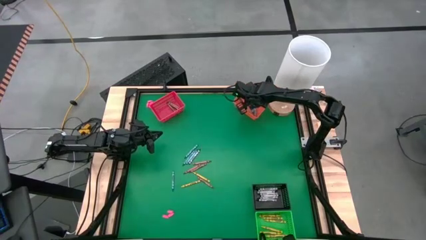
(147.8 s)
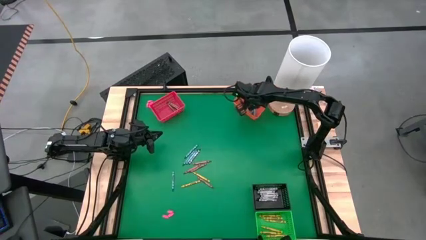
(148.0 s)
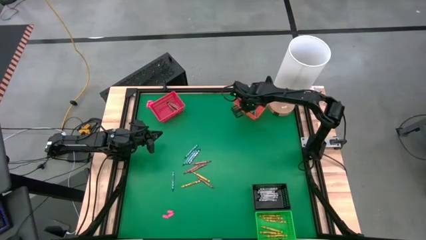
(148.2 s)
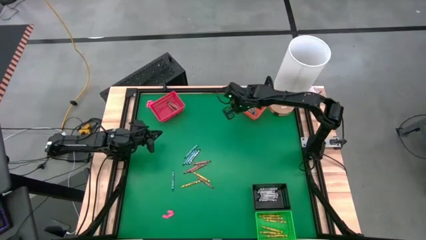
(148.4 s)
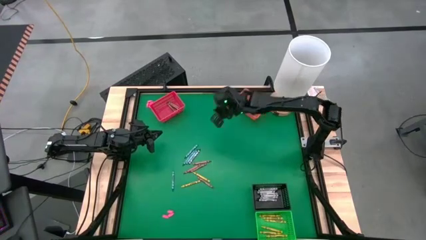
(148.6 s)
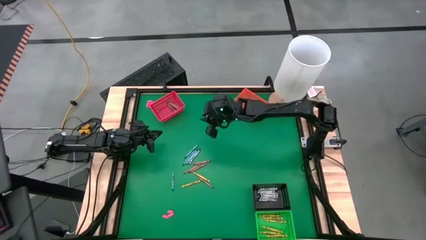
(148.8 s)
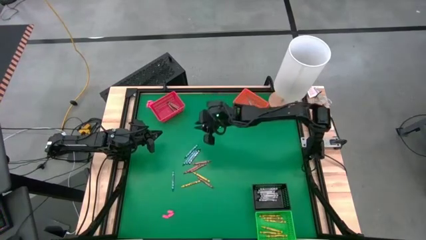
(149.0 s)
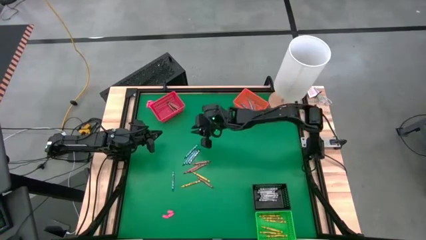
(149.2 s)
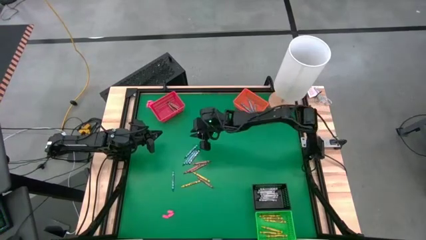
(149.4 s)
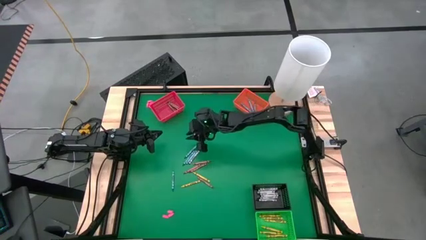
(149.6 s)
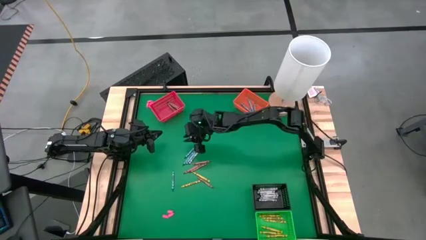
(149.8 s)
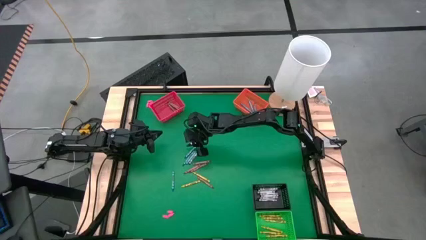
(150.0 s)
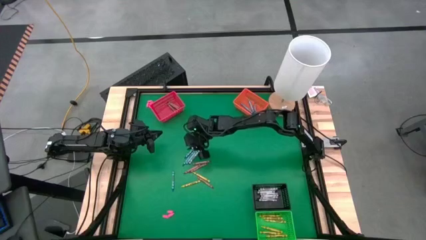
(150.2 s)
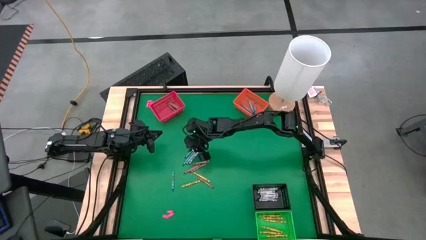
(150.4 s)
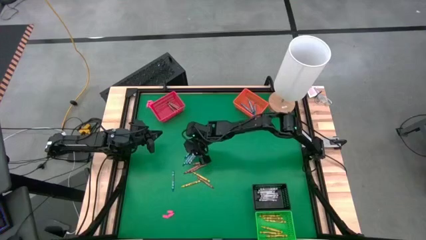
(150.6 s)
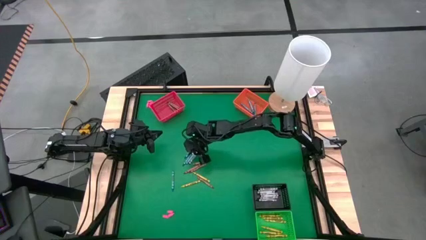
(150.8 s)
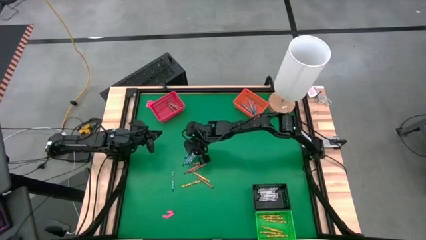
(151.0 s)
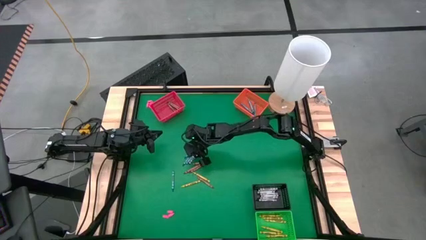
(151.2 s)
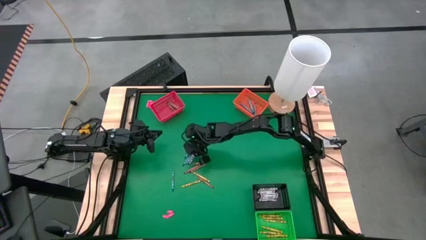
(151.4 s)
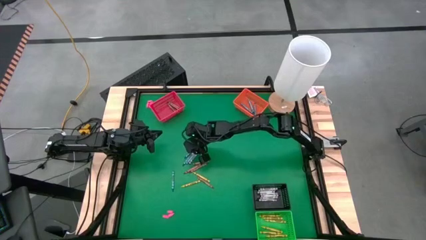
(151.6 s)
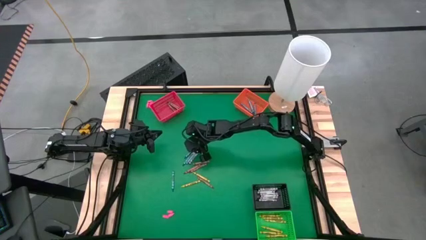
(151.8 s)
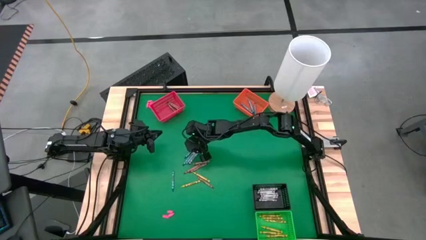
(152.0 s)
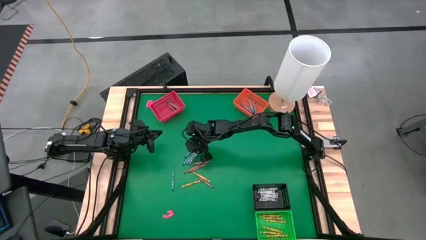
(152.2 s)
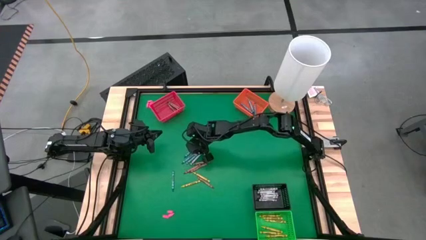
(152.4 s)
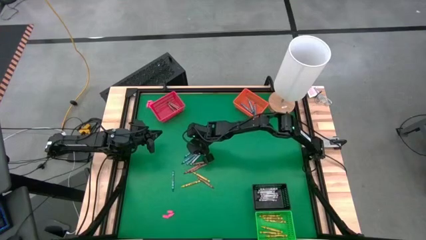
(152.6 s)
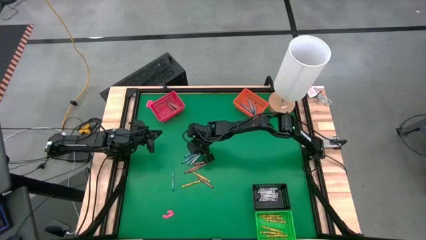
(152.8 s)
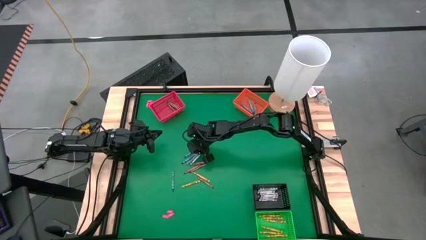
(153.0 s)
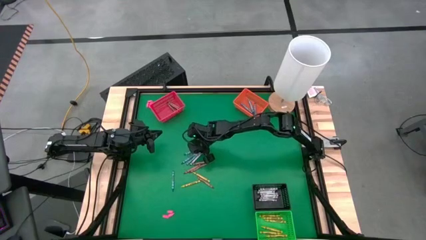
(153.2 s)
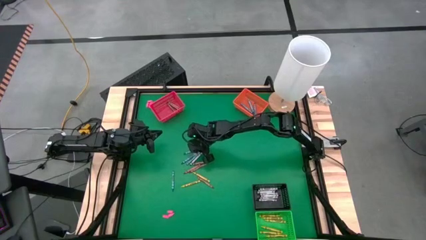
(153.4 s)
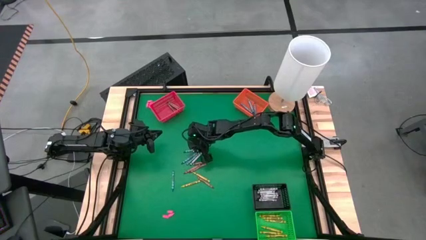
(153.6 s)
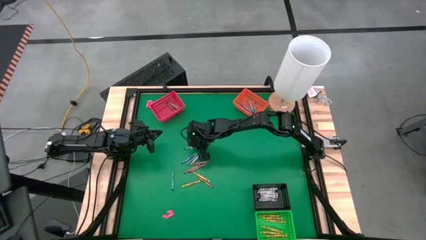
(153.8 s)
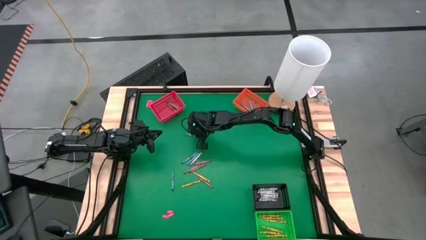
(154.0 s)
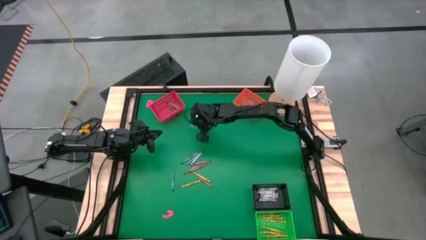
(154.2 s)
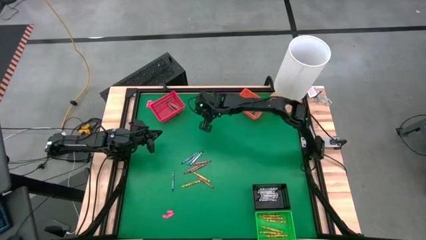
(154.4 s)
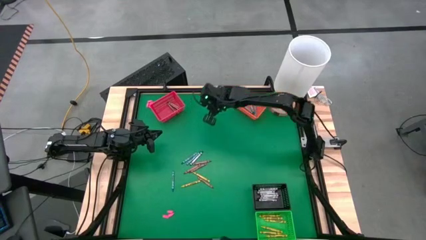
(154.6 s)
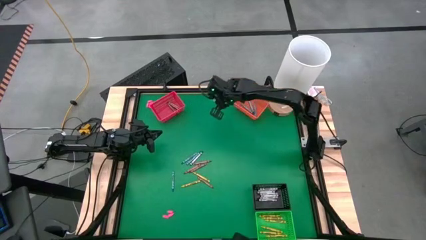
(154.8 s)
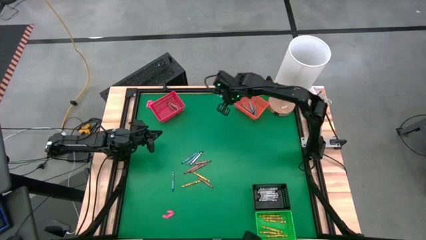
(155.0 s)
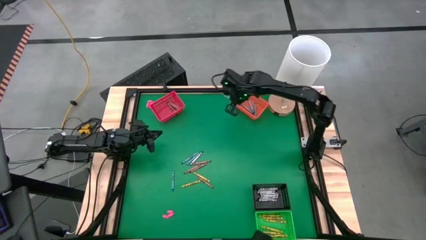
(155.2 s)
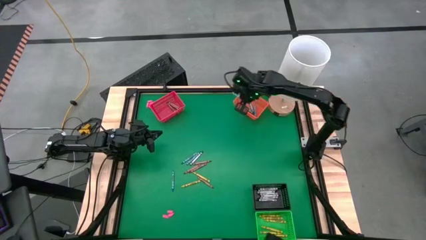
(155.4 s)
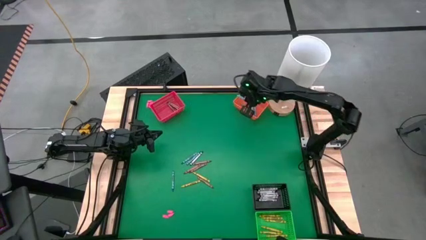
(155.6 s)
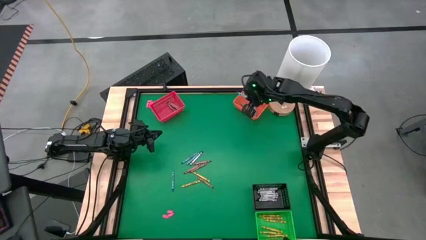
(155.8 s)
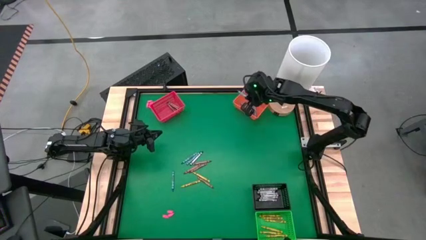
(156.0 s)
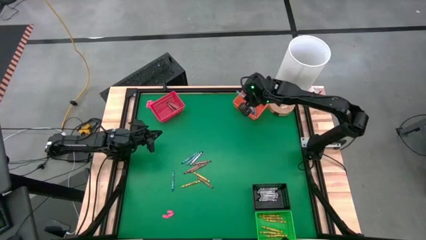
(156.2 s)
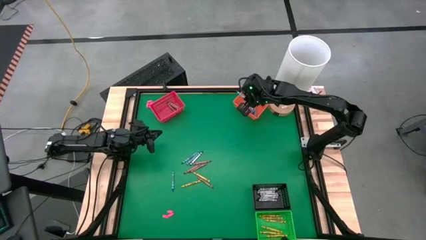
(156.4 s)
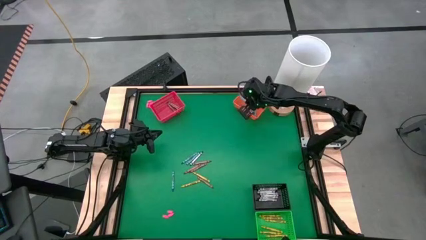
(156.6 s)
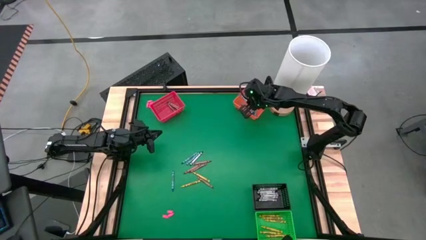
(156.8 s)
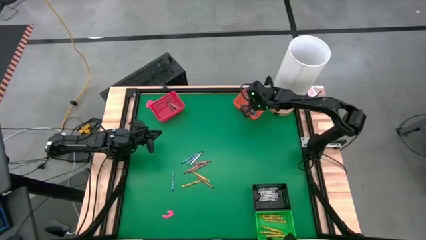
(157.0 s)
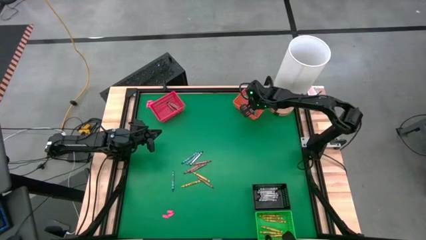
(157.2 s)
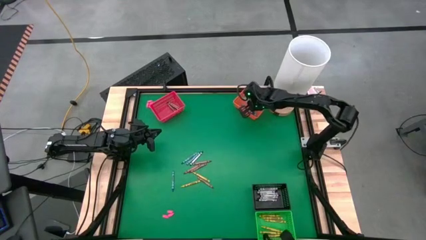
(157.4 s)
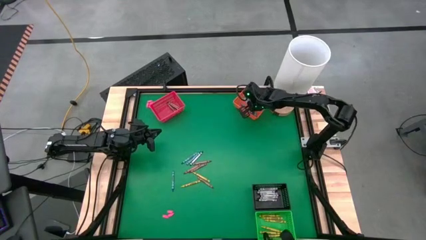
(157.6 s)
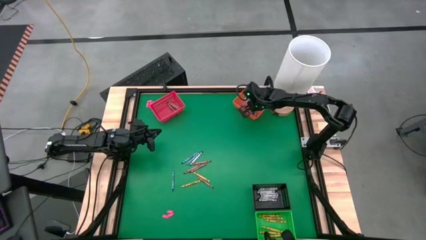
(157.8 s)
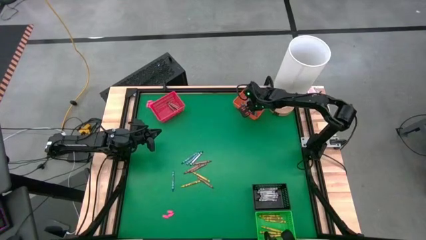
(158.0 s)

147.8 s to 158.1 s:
Task: Sort crayons
Put the blue crayon into the orange bin

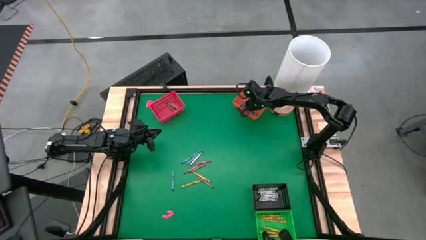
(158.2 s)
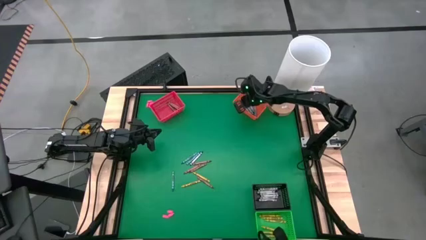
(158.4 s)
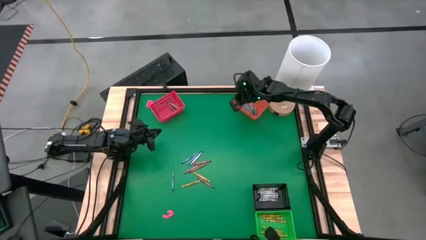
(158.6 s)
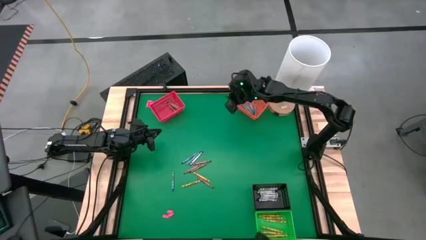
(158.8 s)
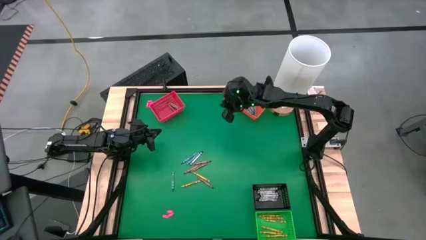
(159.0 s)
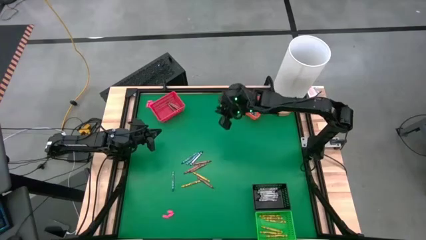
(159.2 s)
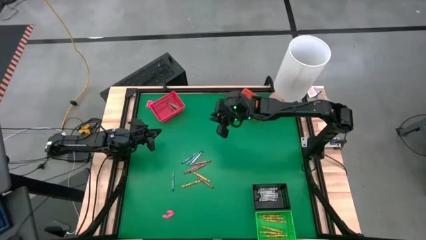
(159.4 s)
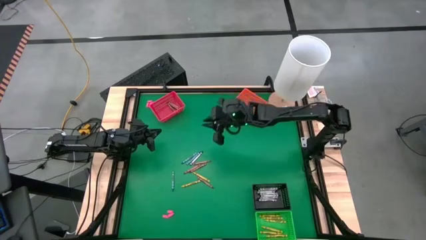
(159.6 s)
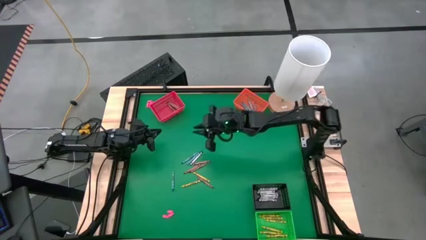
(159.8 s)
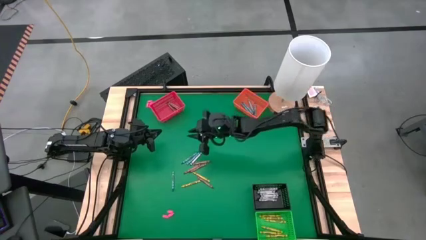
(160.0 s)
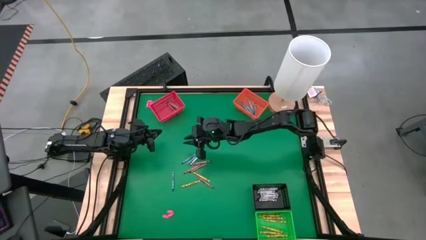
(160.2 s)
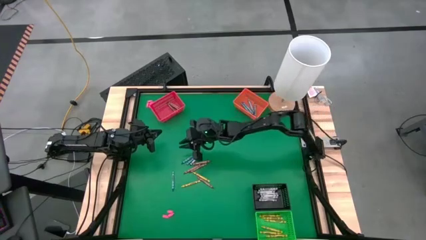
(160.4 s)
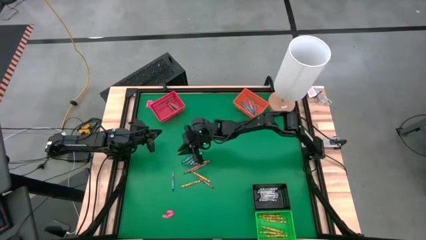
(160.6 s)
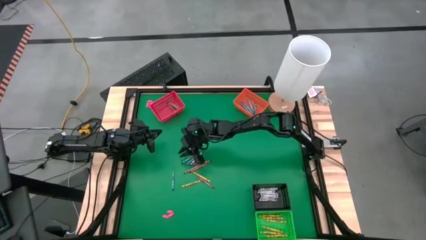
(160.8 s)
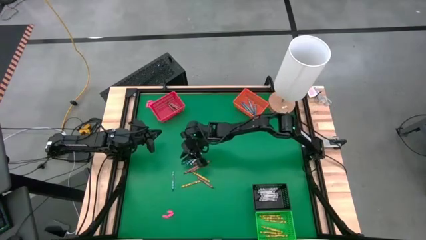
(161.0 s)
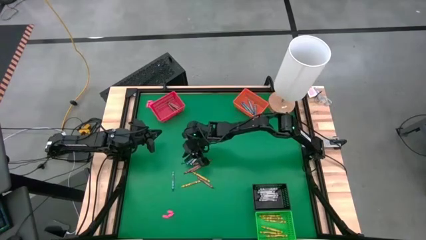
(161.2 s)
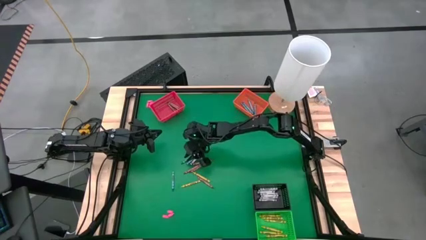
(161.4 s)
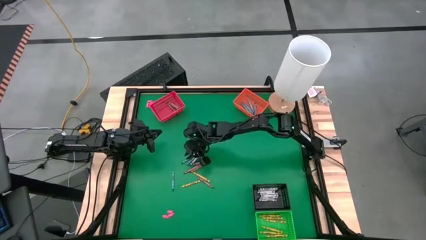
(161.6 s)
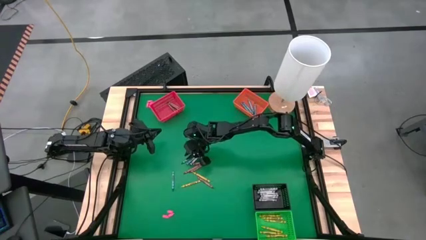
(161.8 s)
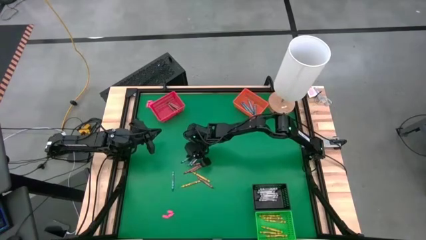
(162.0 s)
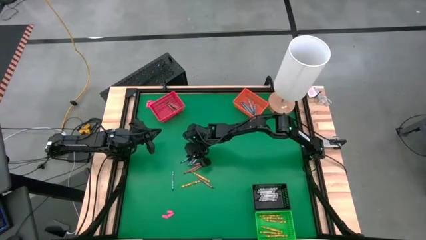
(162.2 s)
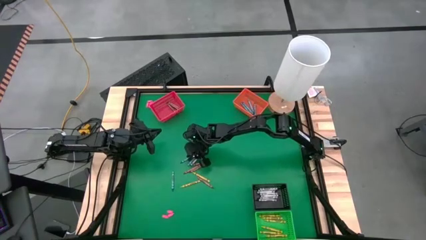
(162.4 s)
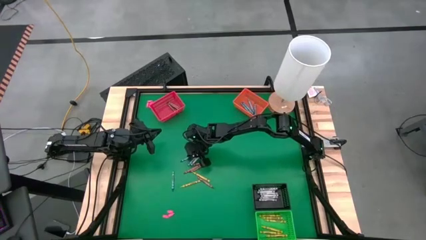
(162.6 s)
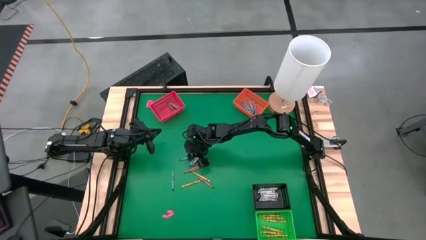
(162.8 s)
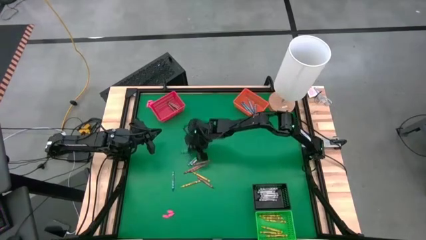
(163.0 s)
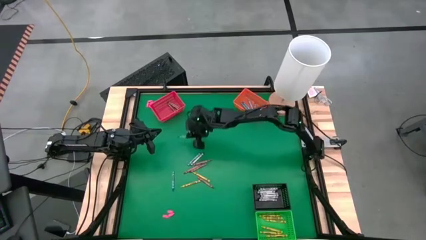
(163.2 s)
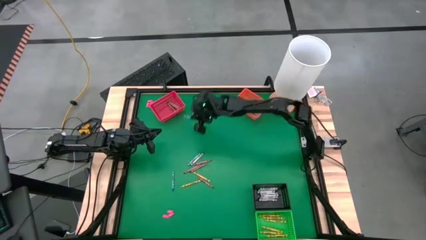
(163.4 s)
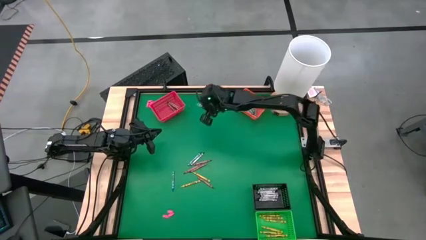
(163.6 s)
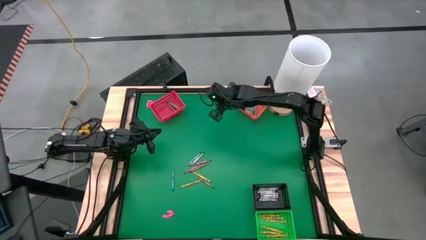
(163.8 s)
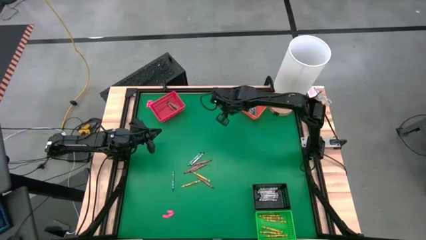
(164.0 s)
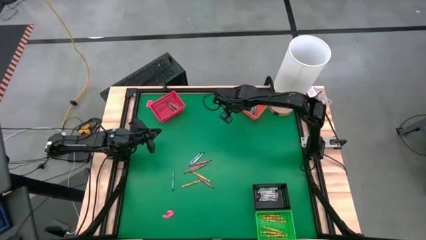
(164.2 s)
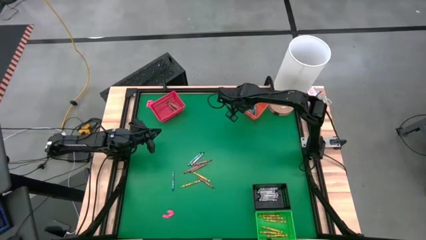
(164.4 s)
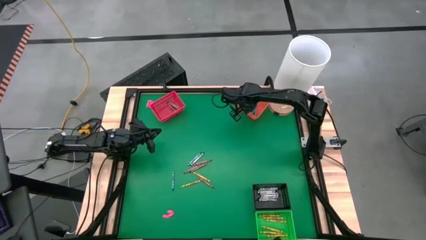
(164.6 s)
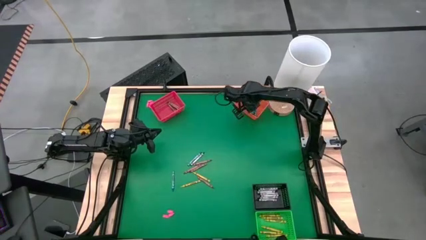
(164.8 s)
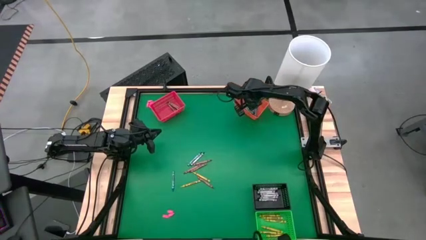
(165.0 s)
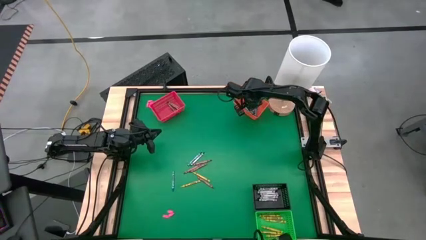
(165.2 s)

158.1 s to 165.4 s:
Put the blue crayon into the orange bin
